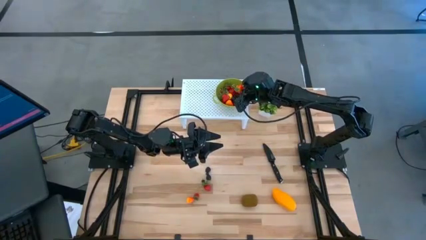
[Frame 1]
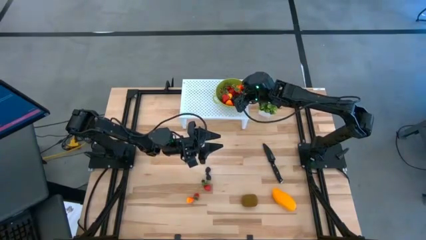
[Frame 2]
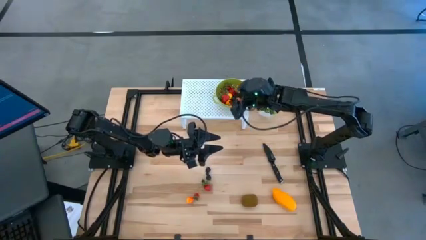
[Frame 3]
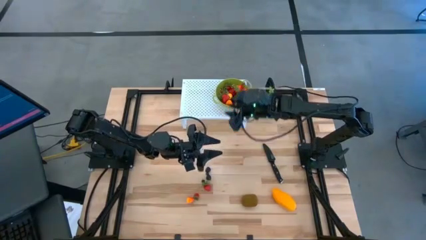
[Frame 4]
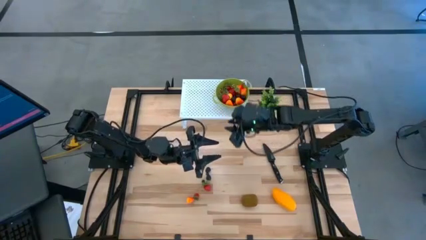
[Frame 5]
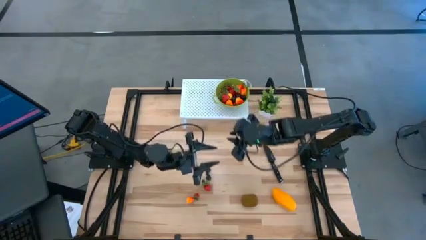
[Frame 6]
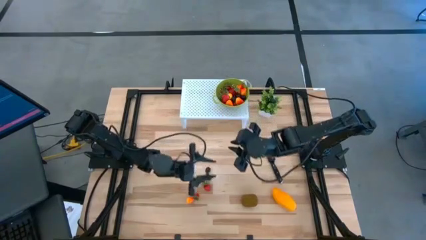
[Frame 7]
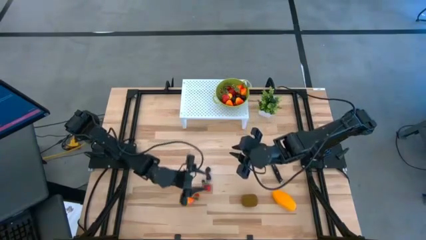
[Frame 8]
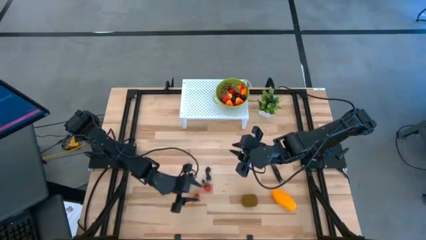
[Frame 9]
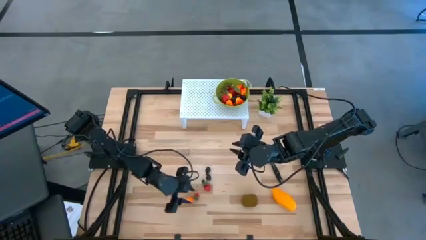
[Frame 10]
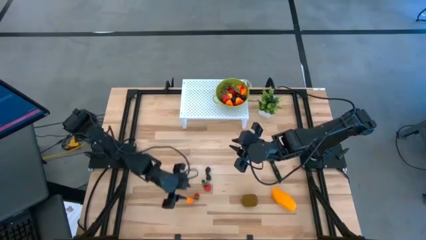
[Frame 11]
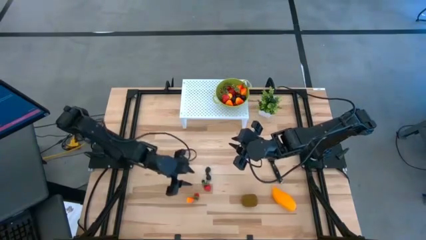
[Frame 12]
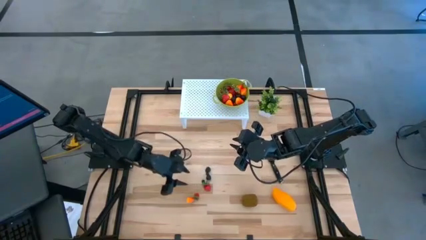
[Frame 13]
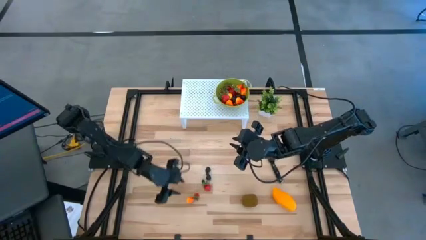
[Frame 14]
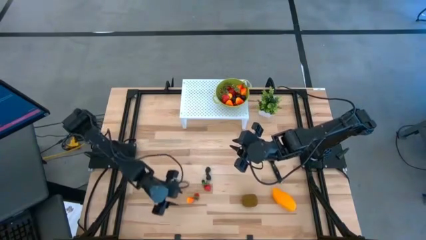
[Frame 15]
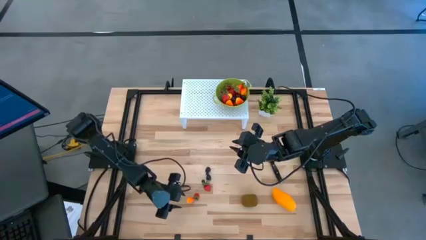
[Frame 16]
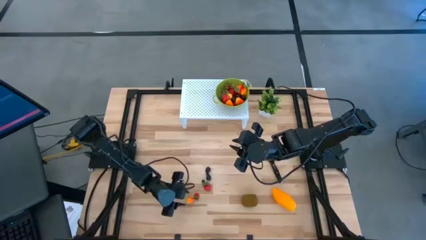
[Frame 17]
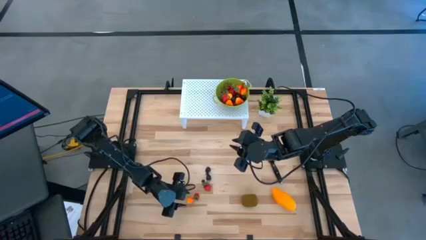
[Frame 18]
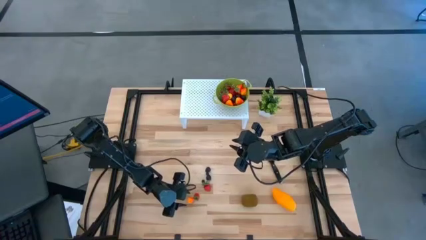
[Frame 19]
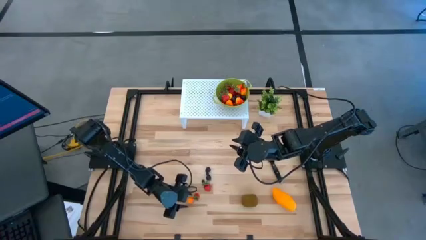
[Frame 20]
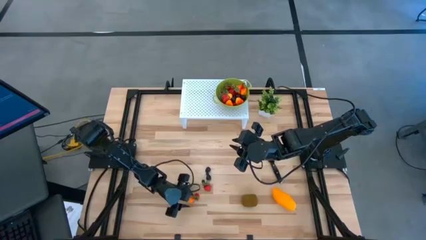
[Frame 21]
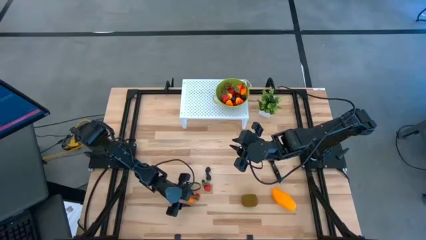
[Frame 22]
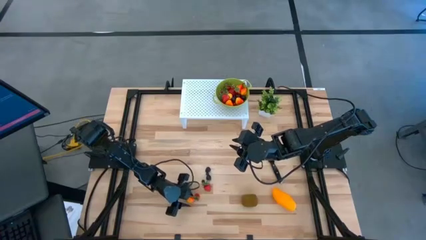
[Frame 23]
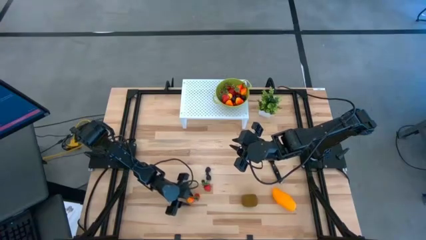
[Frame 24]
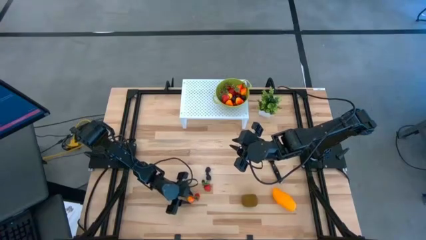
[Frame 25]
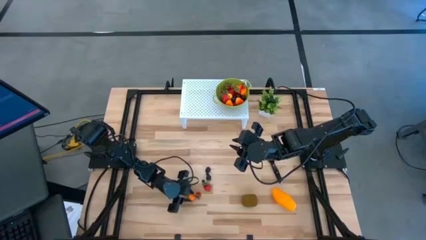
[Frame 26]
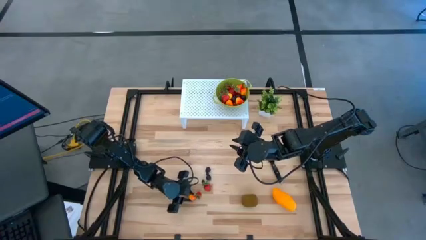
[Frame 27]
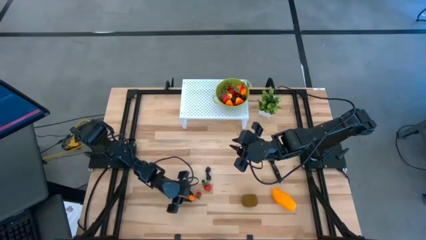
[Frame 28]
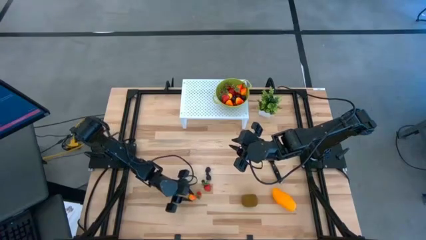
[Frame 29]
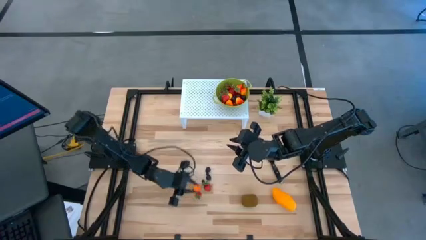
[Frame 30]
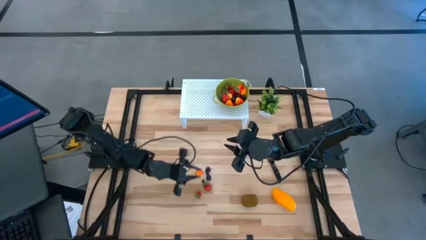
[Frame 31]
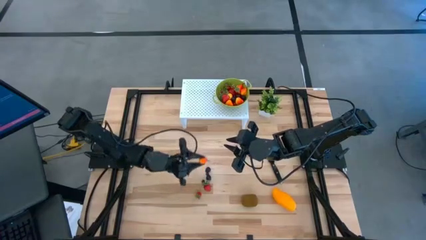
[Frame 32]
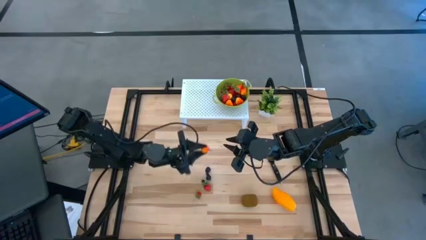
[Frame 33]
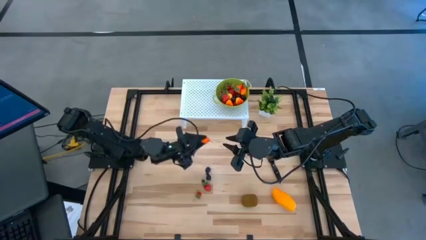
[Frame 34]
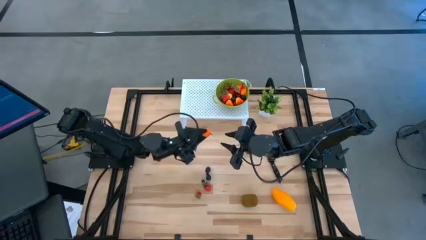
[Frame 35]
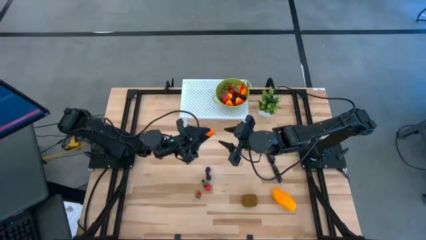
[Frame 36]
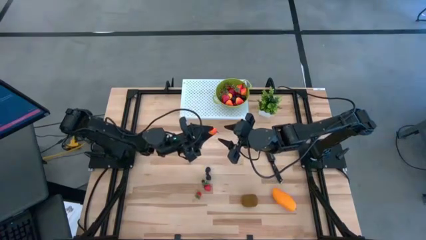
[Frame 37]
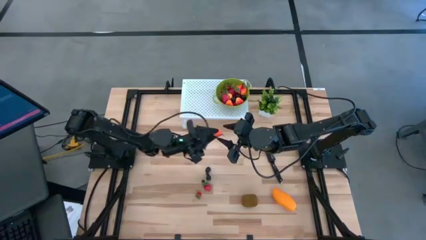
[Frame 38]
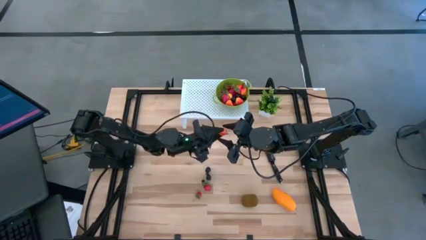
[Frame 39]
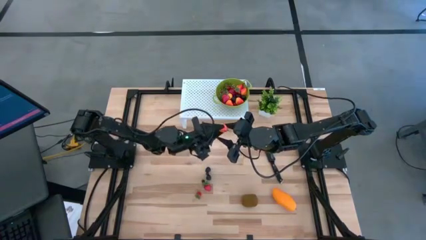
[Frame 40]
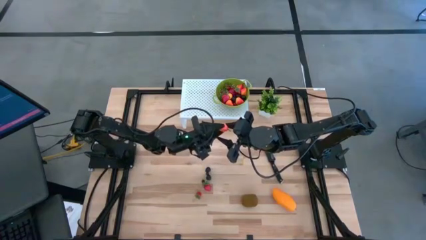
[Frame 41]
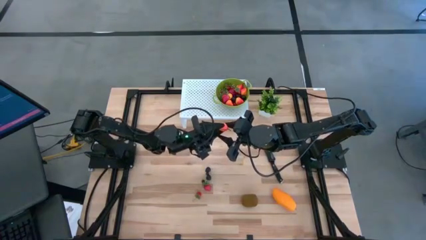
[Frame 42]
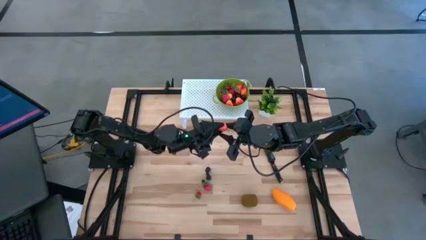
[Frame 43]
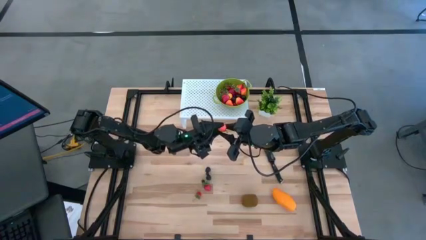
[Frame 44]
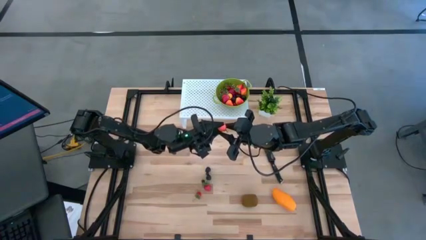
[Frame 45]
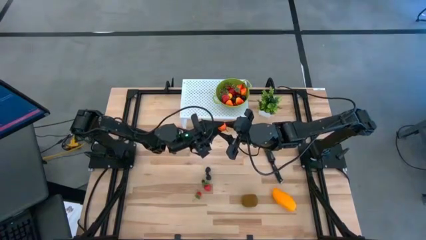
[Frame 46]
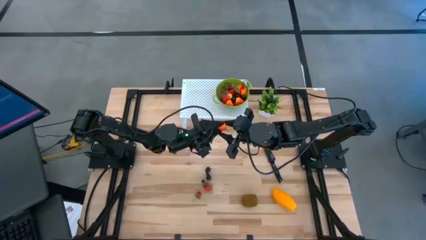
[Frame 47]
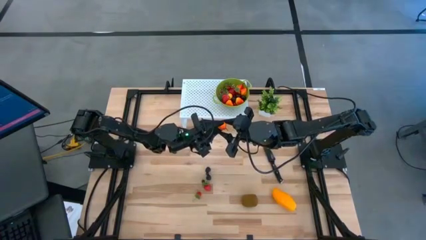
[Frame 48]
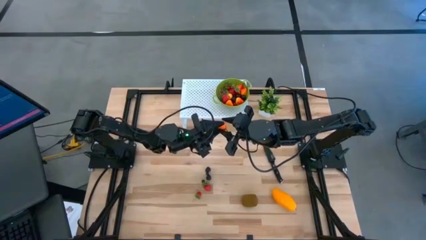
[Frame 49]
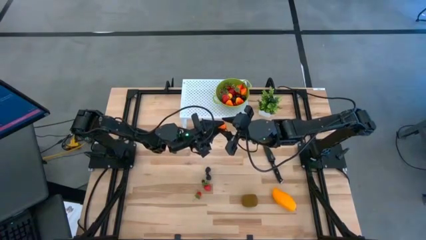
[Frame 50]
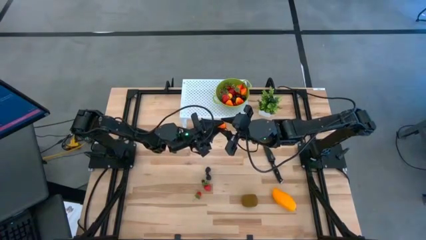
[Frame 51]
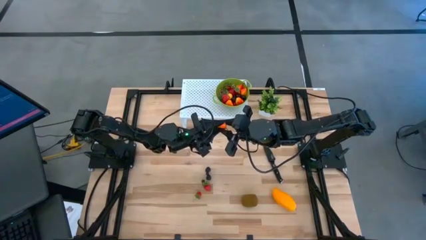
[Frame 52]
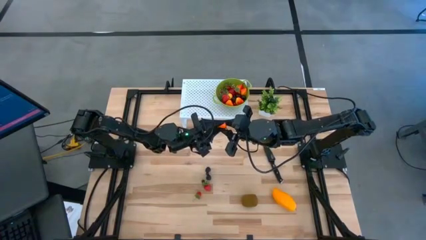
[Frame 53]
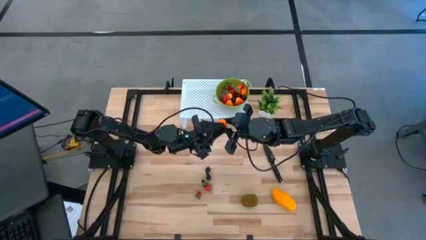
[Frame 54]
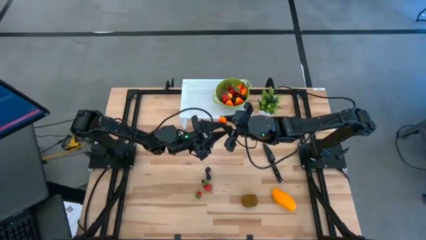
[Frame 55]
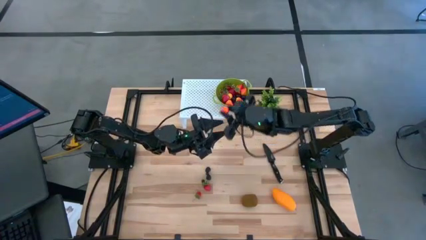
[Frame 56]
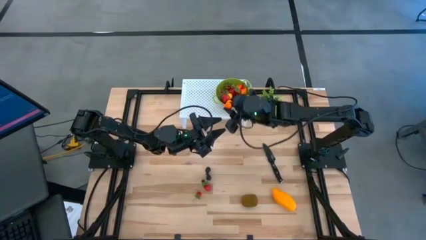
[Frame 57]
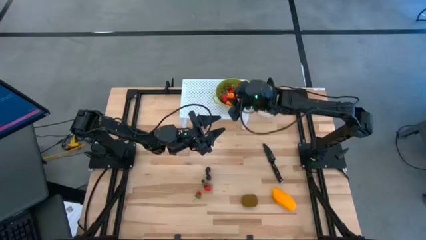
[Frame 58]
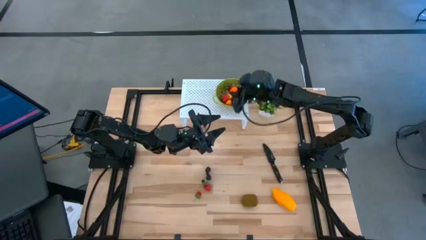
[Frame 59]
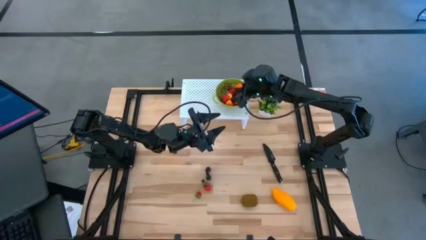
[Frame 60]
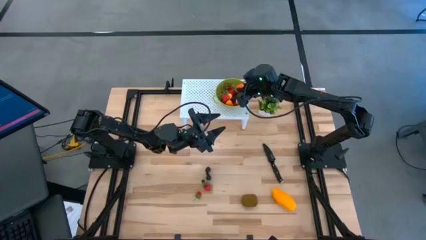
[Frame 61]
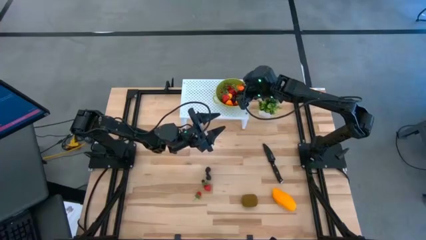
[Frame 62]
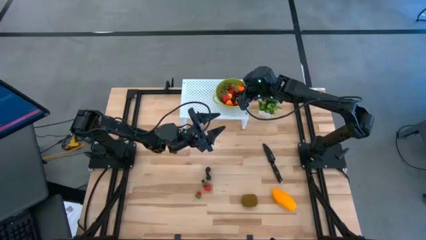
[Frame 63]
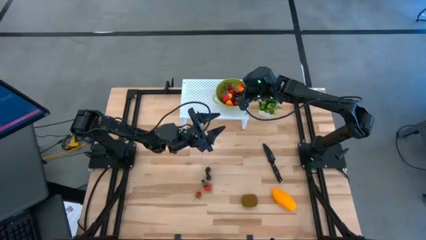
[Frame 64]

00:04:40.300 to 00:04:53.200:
Task: Pick & Place Fruit
Put the orange pear into the green strainer bowl
